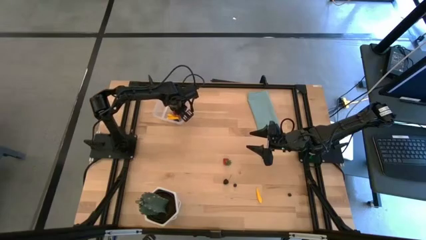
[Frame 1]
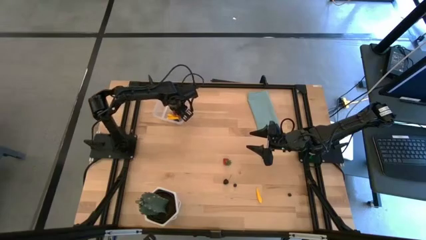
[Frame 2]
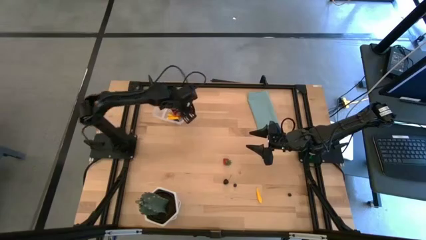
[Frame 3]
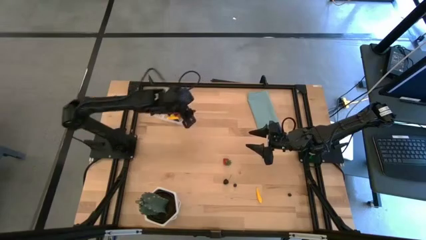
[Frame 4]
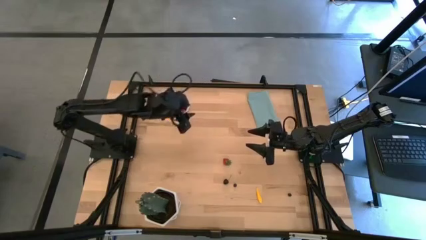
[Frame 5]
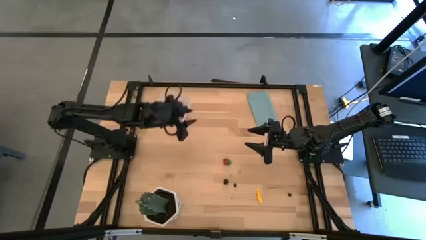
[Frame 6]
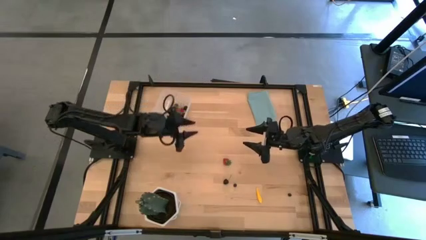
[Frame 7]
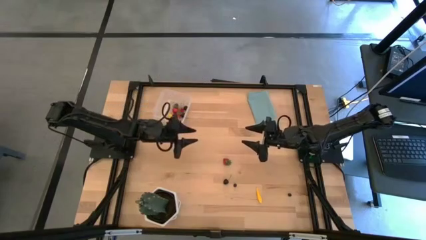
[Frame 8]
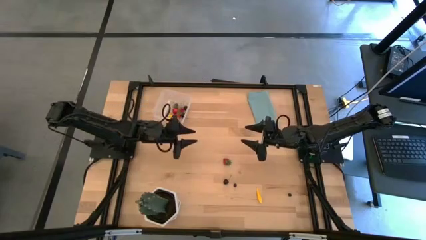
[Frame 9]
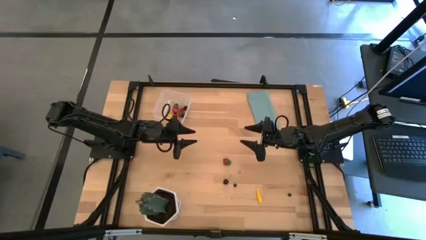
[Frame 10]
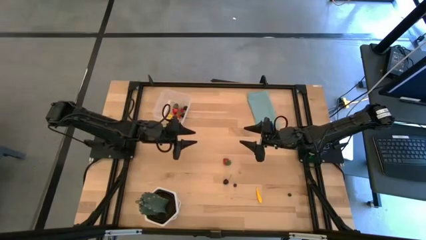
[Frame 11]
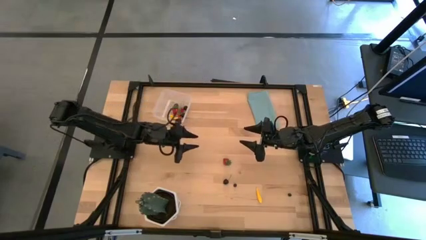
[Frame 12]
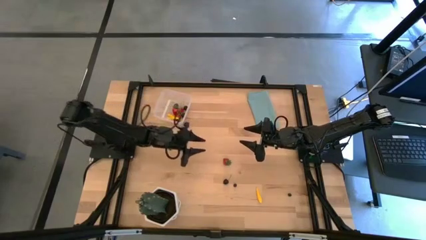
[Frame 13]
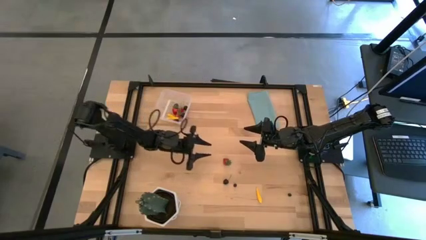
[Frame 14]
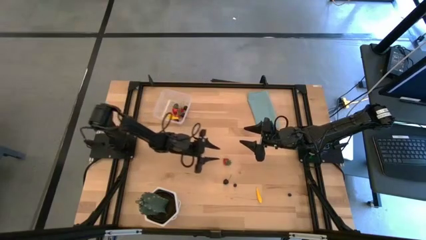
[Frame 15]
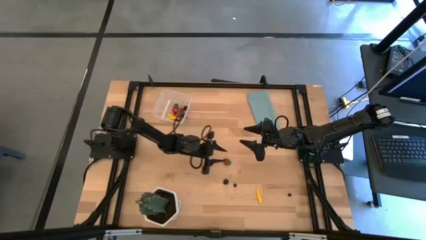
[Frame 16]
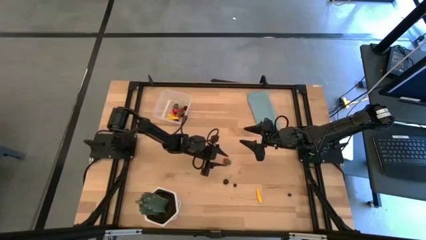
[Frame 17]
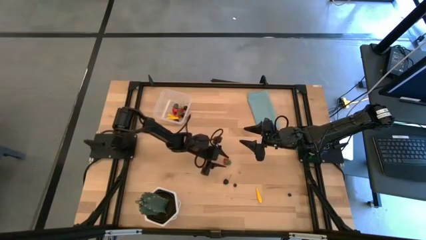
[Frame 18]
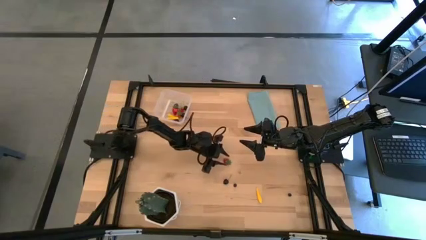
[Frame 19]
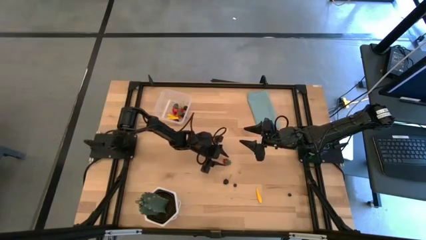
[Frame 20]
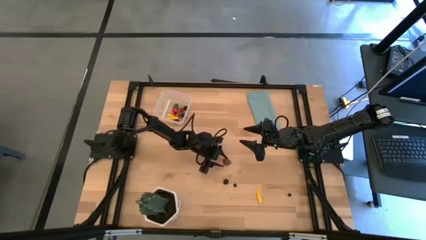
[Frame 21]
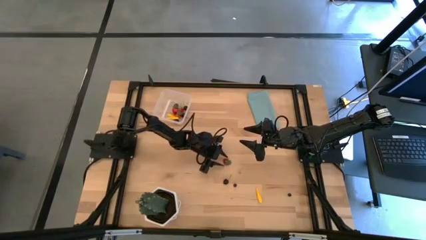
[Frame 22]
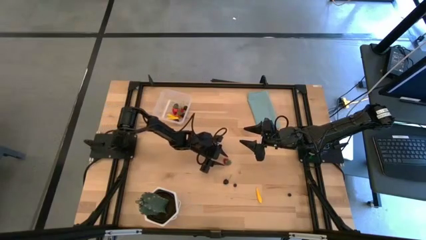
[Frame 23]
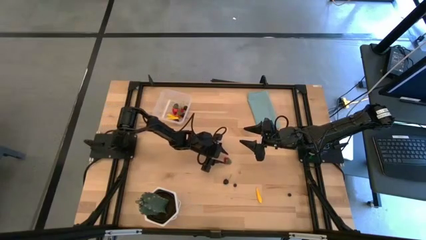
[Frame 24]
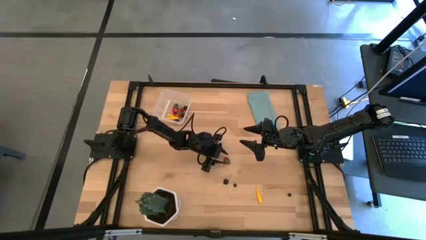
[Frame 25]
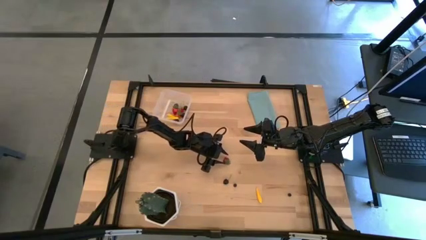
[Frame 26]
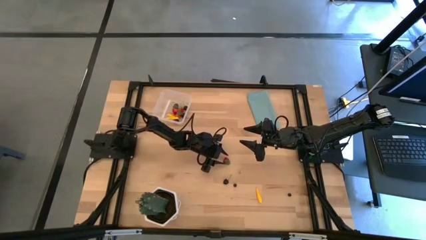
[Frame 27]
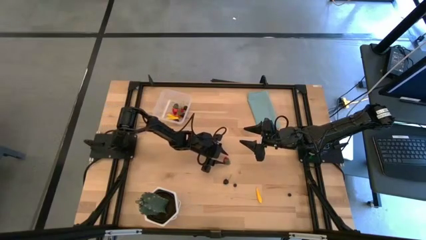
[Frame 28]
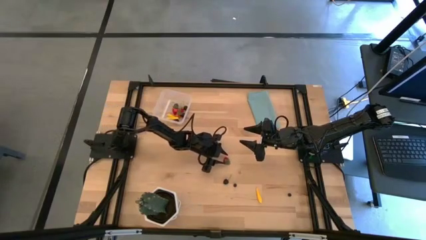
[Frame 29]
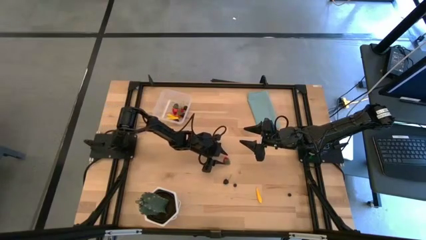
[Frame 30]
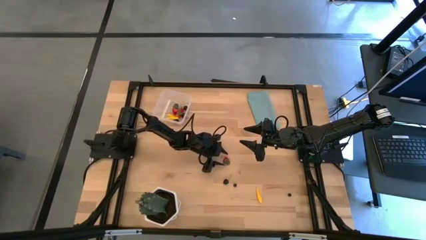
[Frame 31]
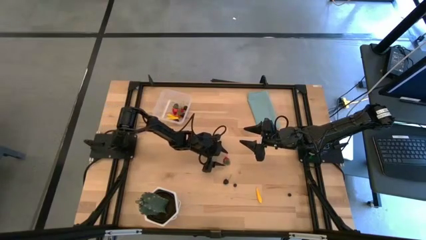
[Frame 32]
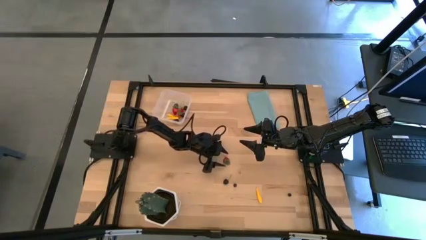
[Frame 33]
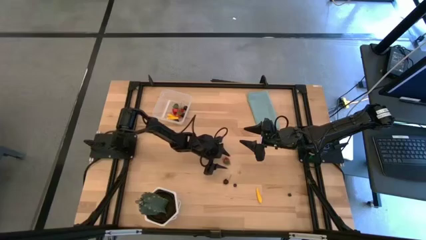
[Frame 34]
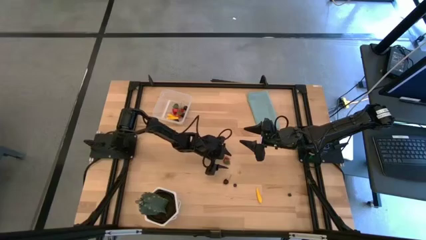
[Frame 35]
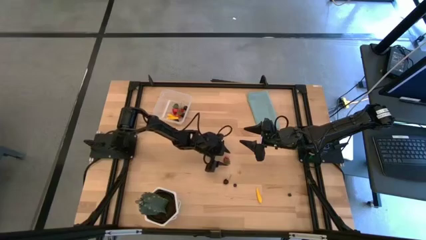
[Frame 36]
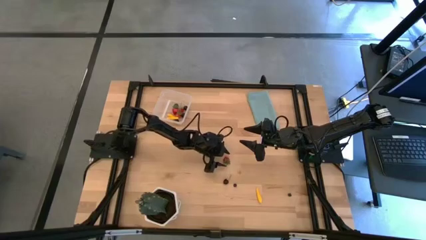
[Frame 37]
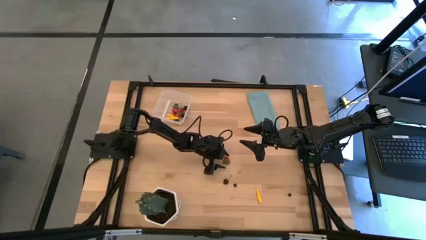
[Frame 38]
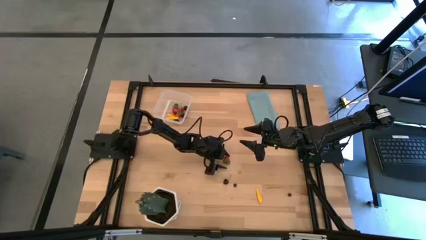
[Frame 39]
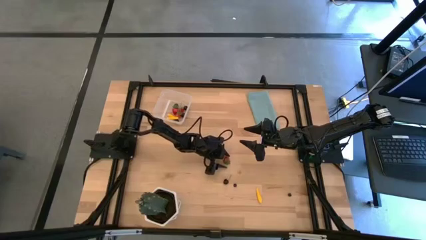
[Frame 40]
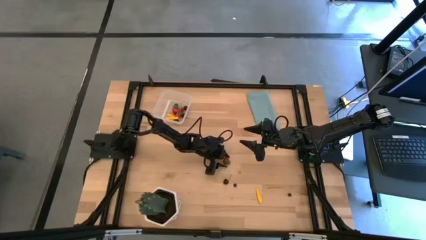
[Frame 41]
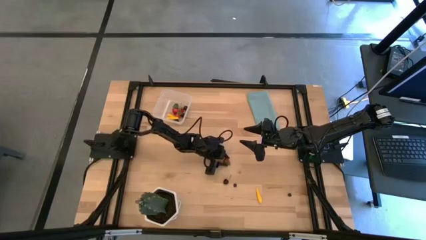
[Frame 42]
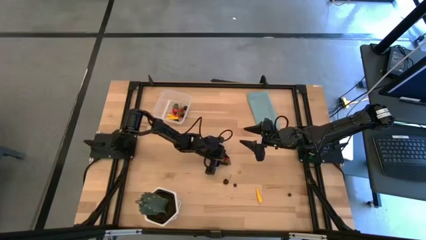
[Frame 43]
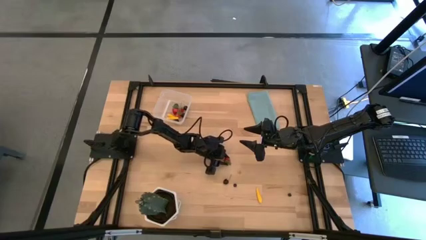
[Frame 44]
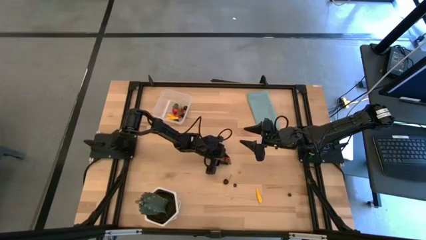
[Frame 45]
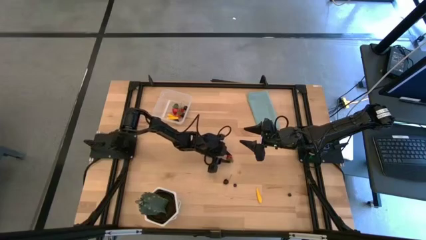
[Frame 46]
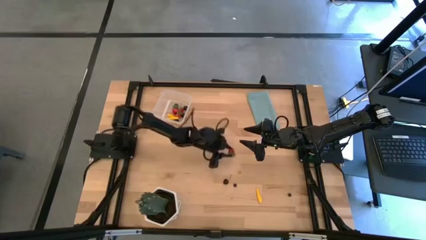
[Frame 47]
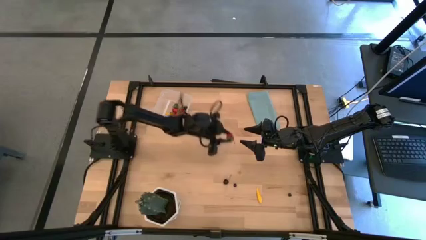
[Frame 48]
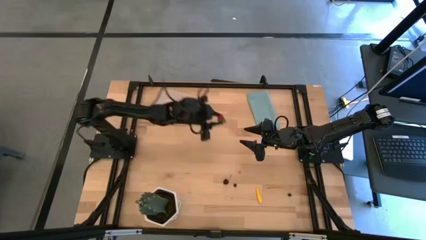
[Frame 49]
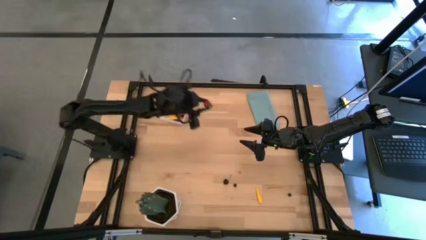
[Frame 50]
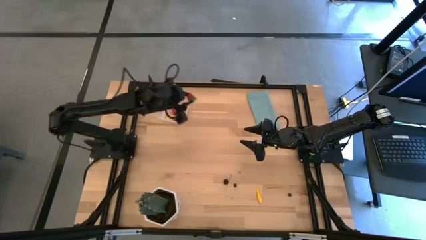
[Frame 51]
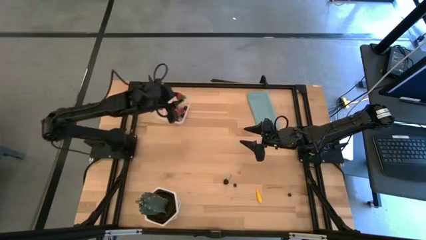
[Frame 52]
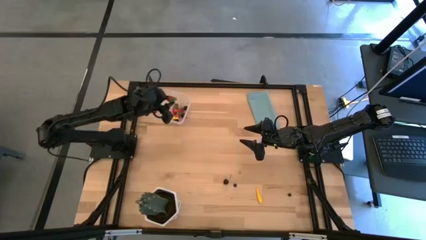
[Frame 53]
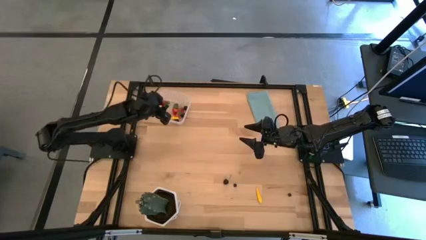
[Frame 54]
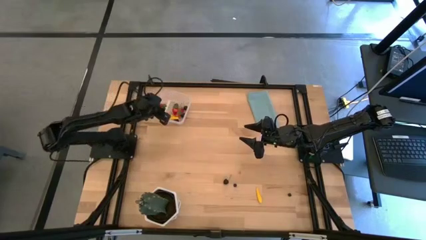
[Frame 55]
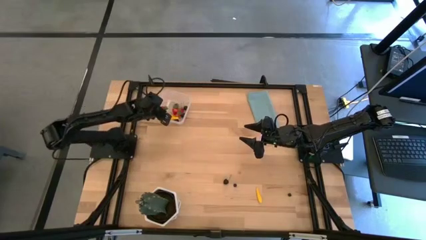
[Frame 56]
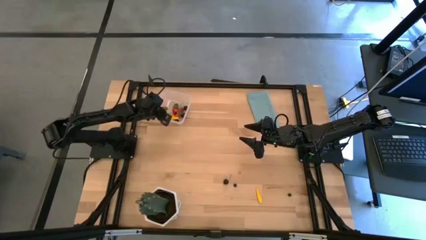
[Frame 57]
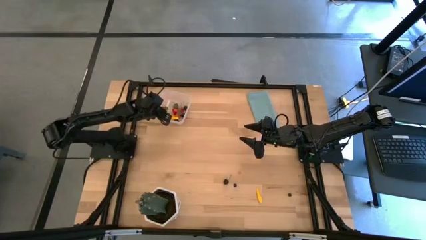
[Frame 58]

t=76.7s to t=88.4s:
Task: Pick and placing Produce into tupperware
Put the red strawberry into the transparent bin

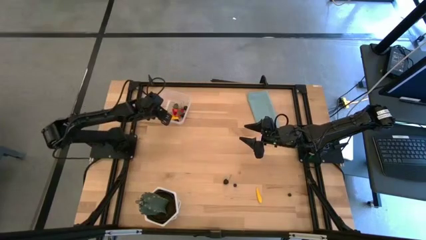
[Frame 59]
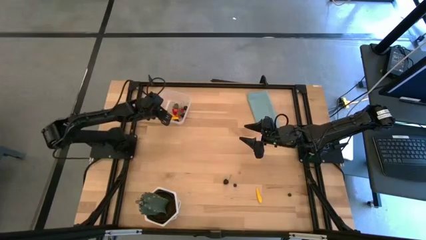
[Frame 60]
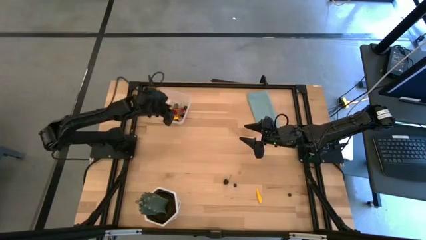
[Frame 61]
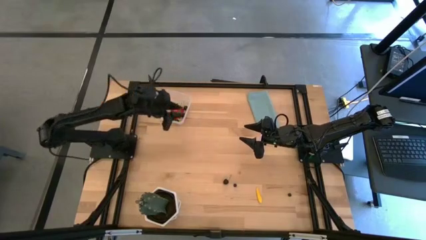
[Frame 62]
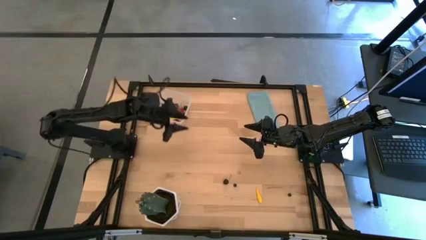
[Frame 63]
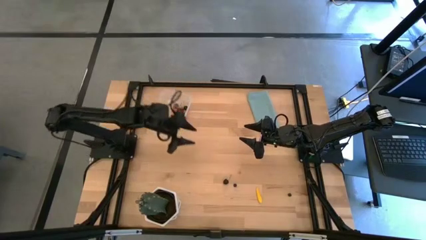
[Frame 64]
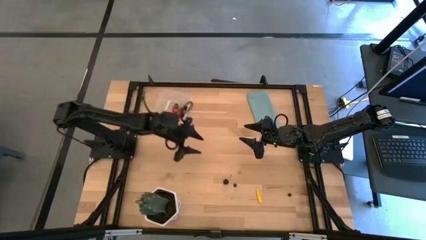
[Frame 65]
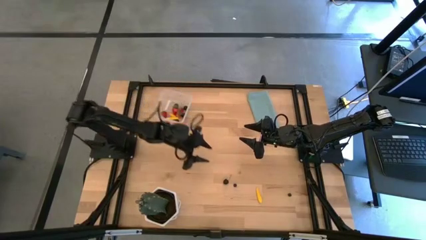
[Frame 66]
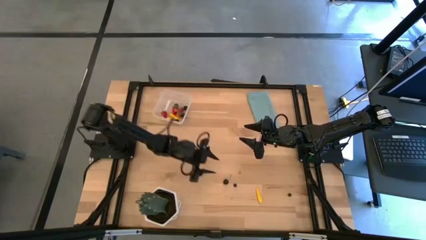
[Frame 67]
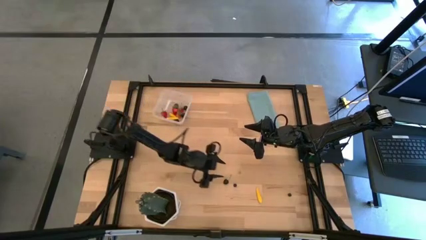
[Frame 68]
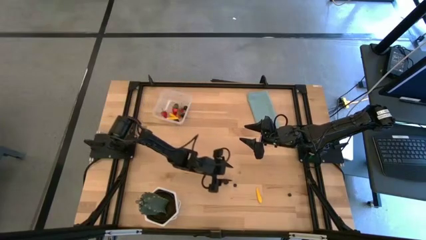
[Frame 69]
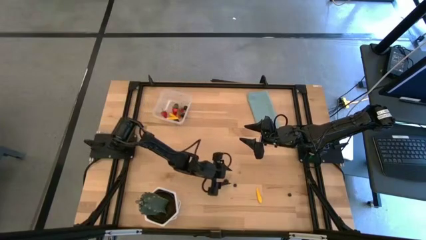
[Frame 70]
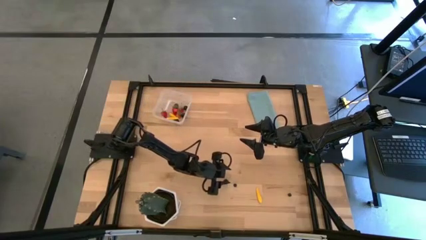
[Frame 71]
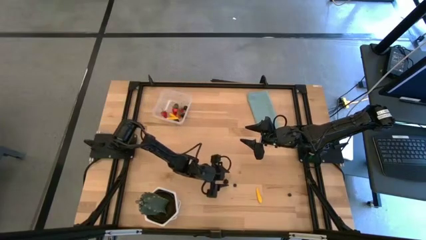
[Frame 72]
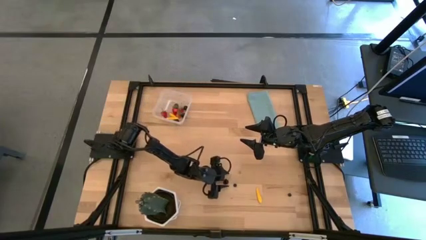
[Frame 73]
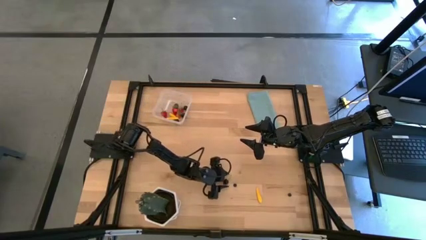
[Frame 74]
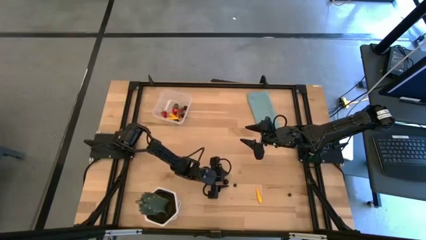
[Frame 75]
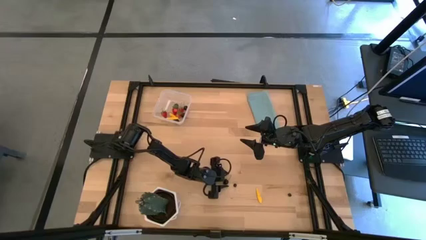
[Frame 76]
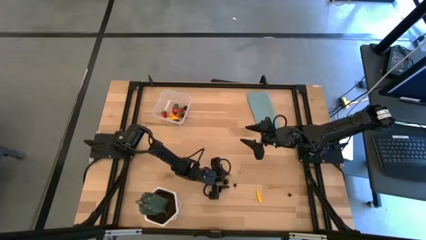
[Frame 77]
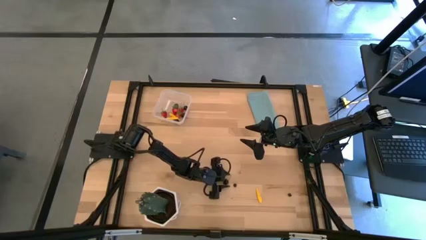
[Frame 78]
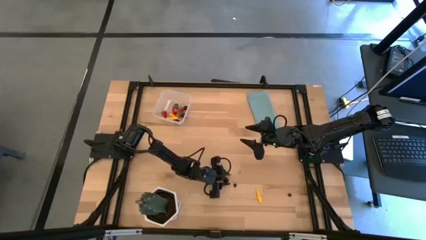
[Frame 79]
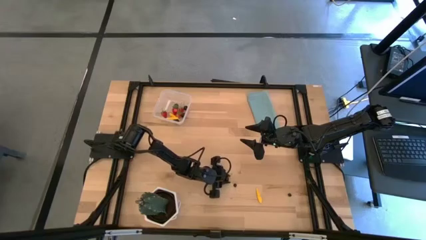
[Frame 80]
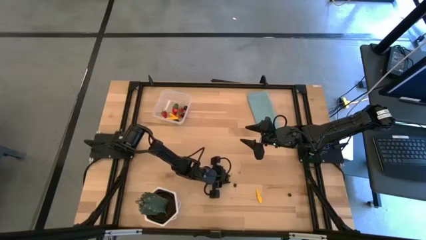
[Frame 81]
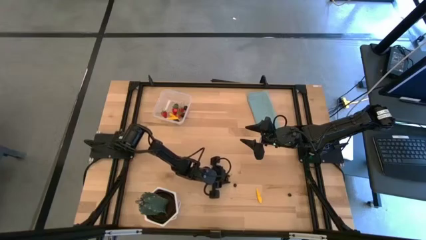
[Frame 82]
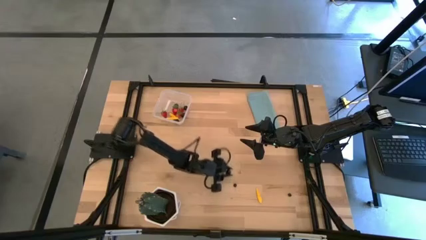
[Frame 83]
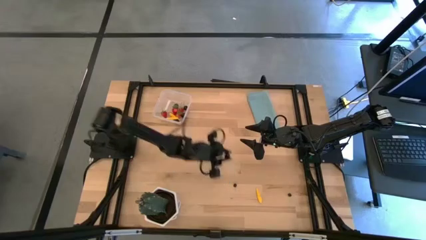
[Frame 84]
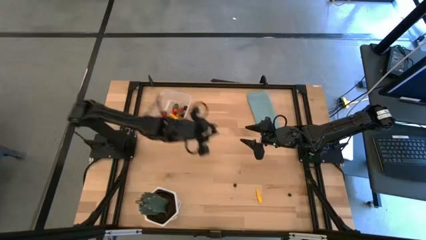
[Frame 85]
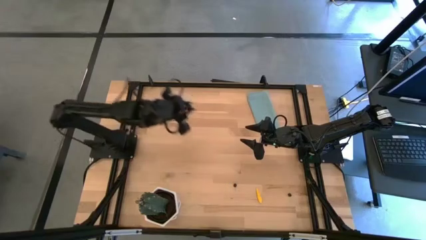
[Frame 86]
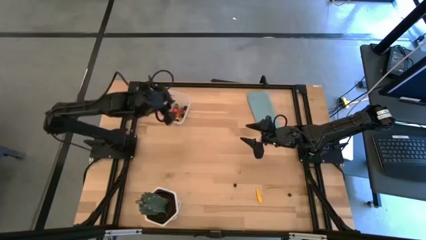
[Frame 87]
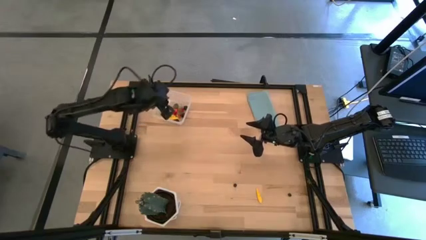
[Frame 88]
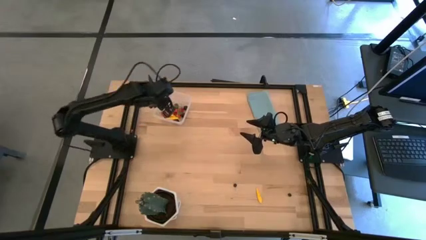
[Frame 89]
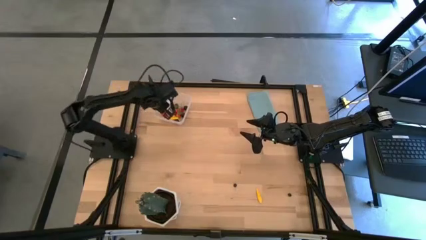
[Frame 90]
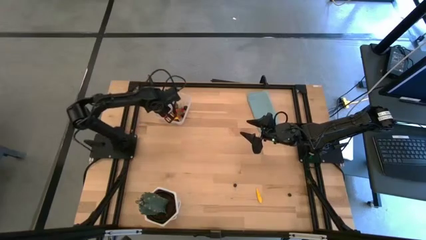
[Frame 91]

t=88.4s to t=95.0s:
Put the black cherry into the transparent bin
